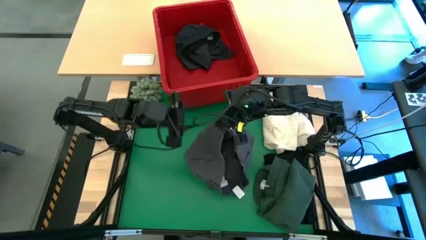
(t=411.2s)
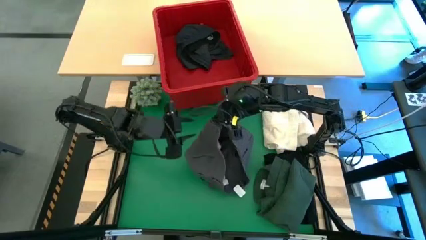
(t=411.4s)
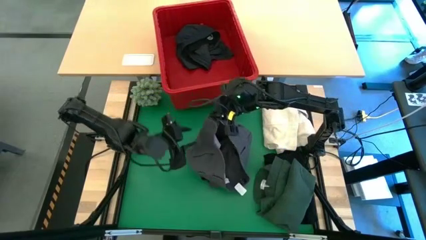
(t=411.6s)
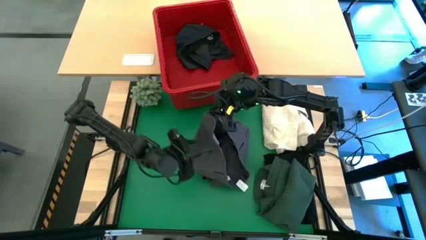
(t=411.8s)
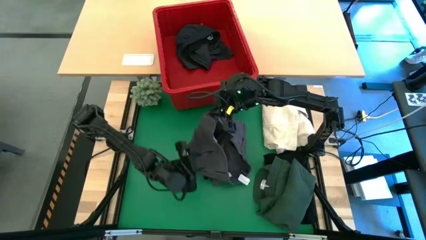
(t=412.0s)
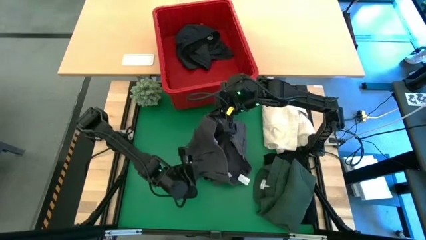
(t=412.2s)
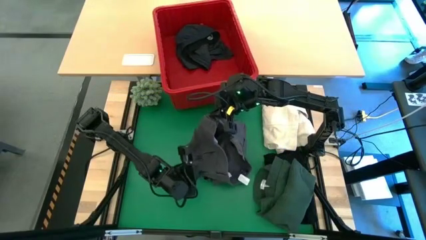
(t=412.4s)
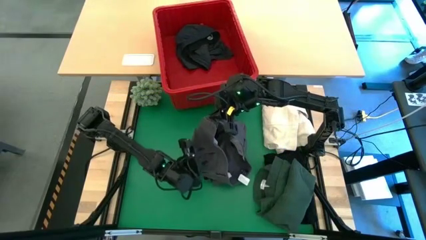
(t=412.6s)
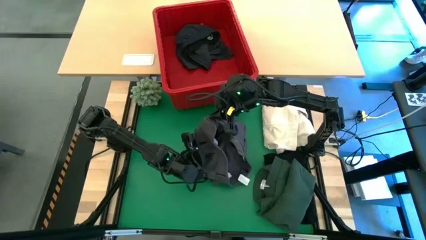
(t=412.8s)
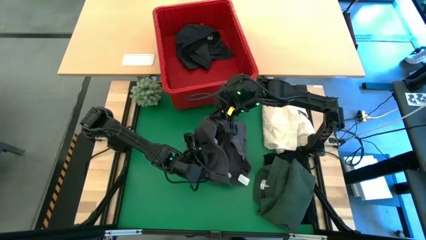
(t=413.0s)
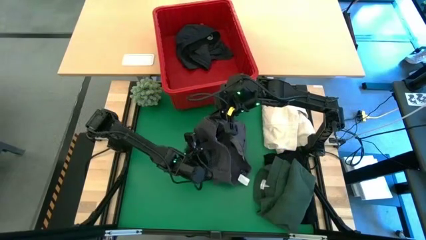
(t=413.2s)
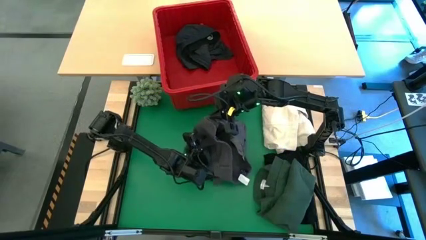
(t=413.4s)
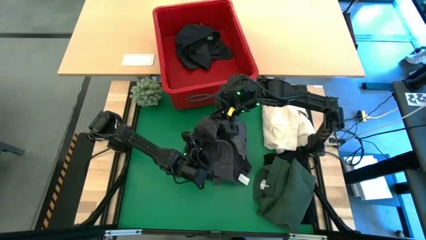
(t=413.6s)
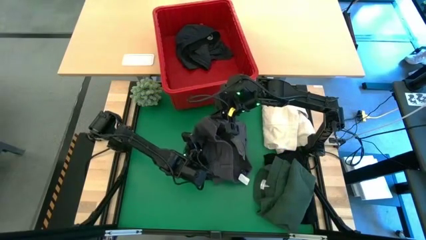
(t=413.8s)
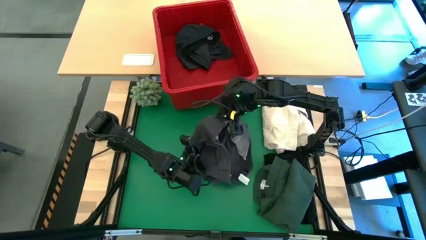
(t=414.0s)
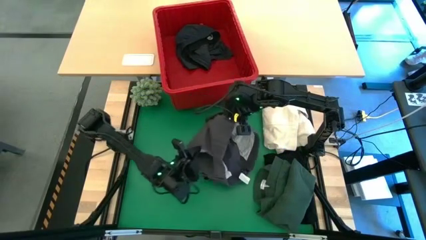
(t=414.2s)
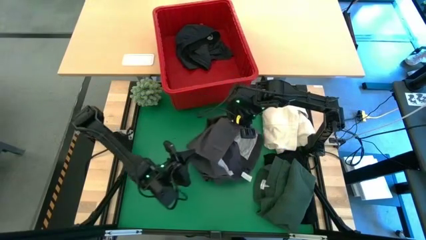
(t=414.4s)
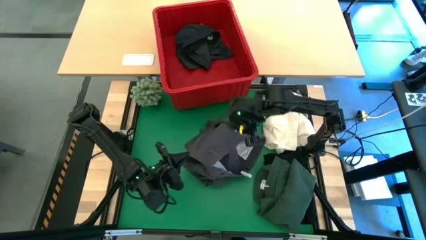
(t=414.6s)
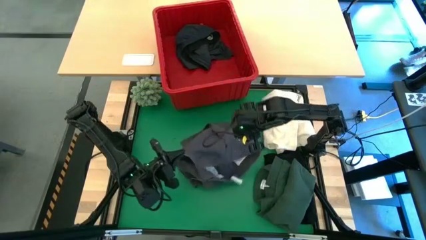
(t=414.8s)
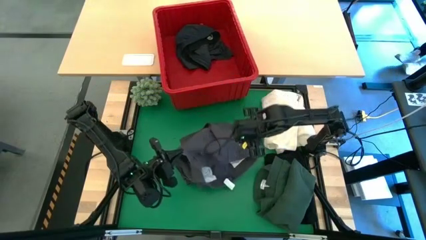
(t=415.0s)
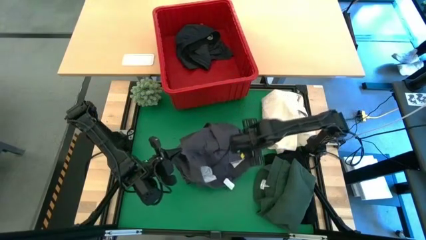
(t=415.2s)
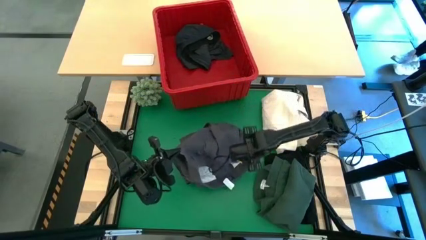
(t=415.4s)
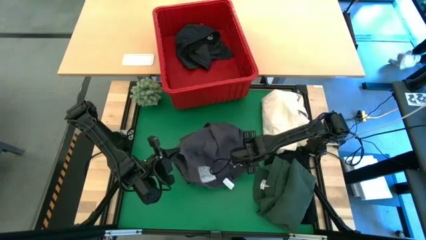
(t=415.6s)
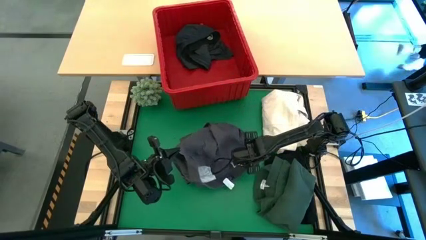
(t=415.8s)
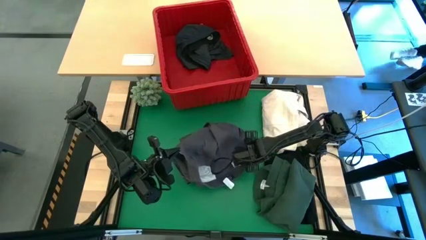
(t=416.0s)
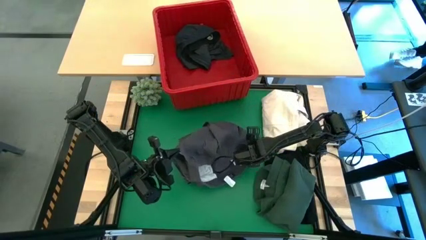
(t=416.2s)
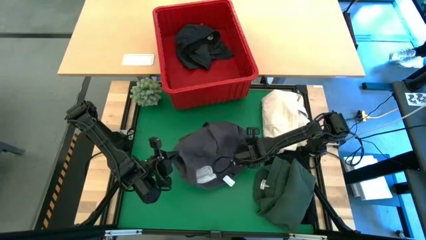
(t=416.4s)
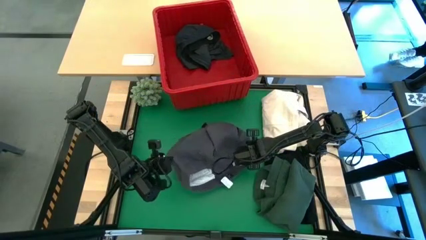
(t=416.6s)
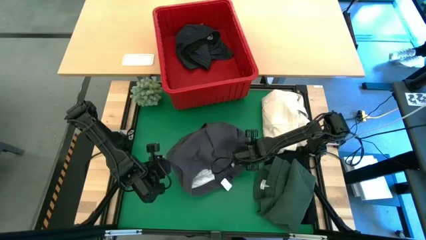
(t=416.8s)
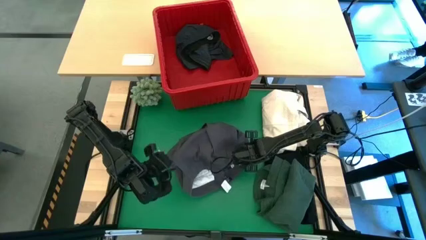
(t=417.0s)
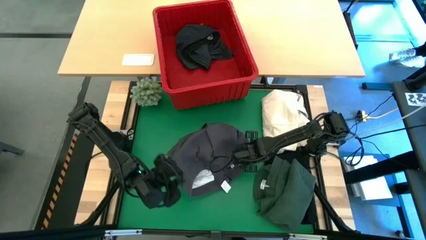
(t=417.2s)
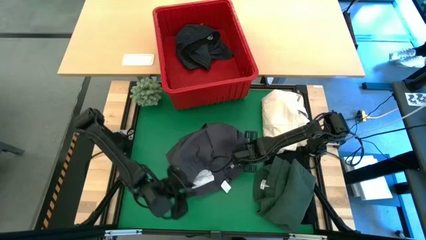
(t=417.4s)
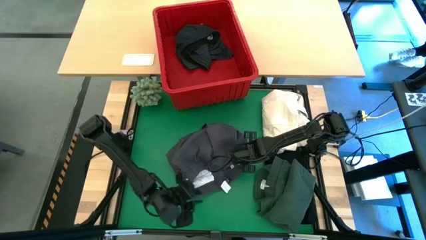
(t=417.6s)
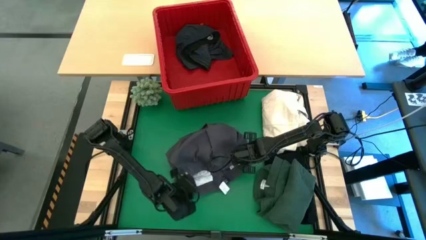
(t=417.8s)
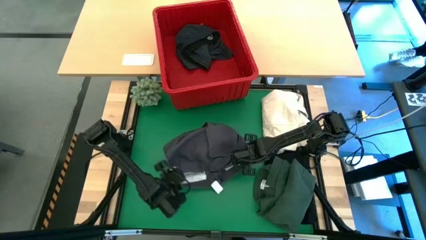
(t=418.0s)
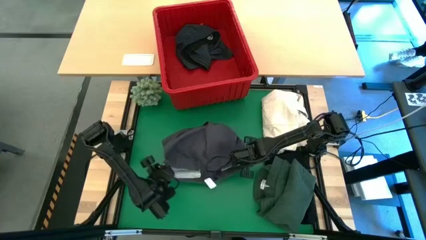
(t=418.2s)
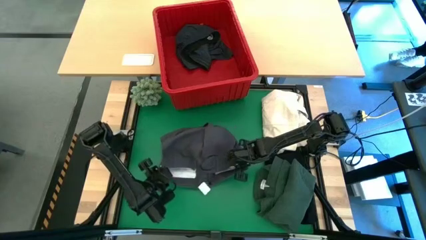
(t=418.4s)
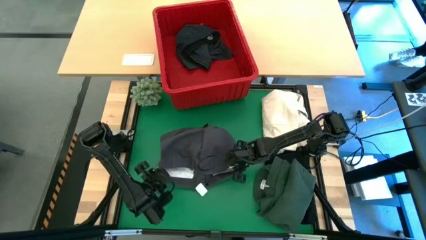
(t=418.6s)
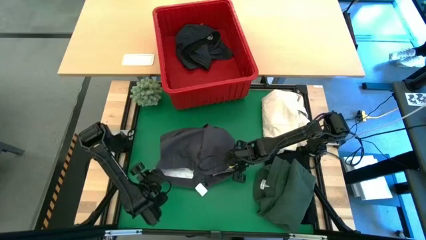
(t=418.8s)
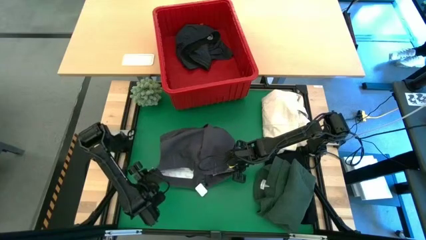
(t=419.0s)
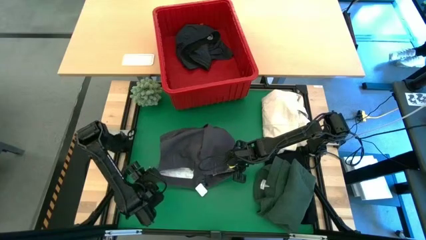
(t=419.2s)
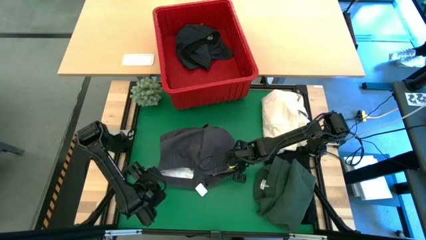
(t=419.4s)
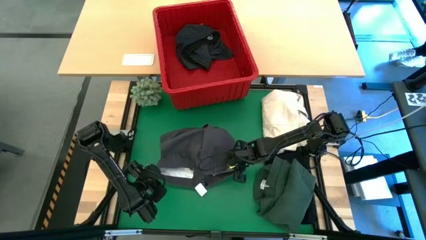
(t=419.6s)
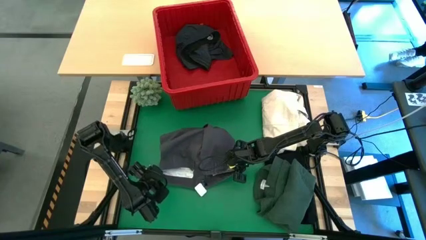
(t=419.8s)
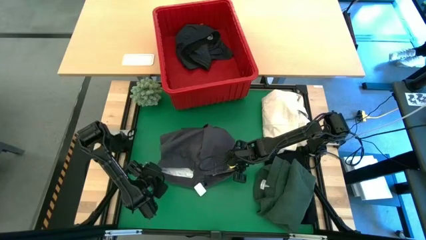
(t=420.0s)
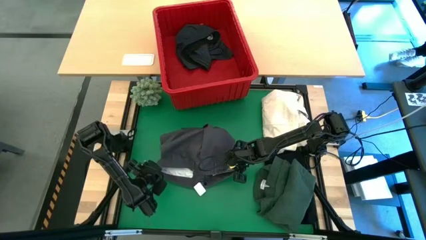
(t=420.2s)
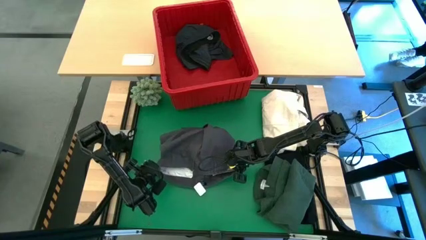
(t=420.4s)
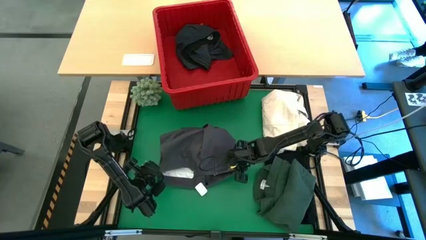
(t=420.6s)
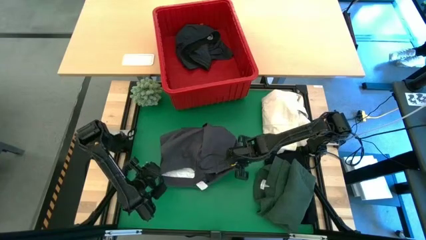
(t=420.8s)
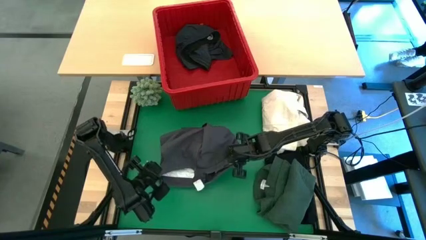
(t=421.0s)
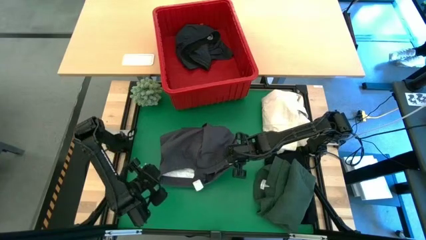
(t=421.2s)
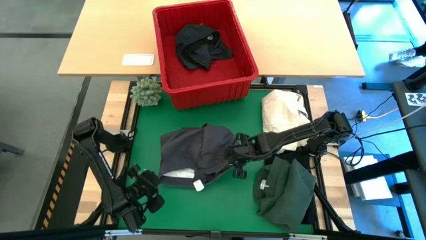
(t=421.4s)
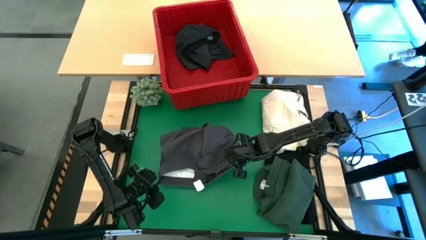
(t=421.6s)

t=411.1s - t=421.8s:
Task: Fold laundry
Fold the gray pants

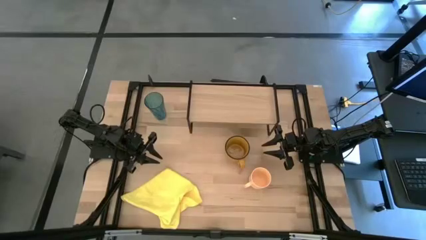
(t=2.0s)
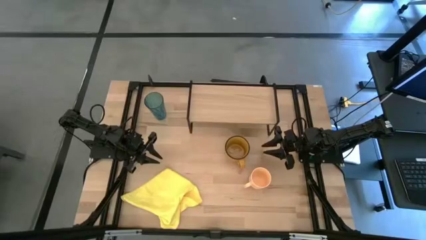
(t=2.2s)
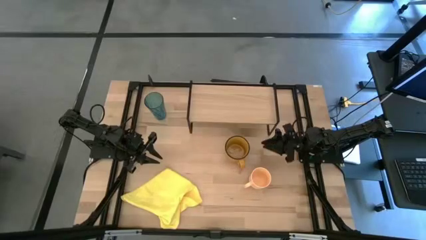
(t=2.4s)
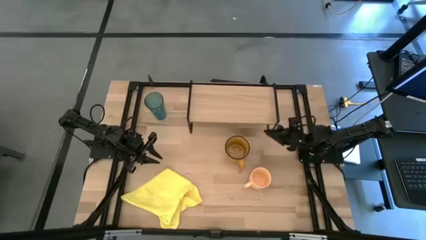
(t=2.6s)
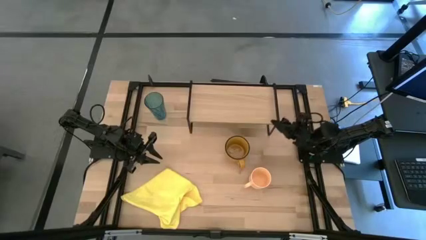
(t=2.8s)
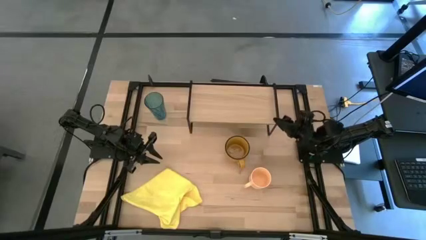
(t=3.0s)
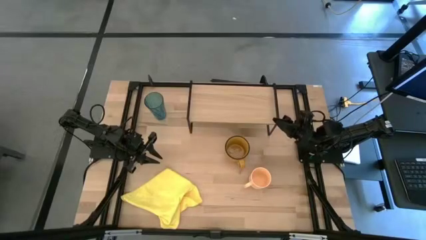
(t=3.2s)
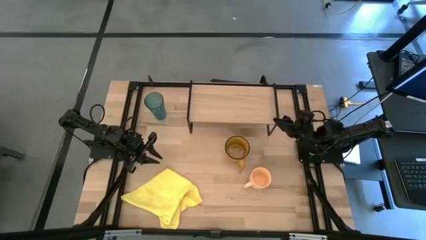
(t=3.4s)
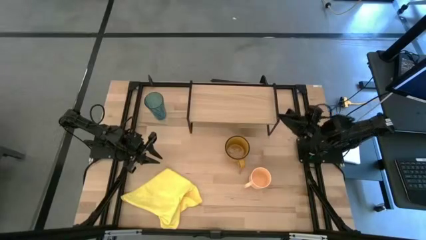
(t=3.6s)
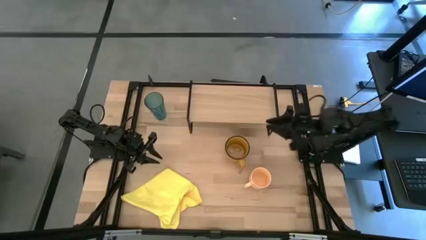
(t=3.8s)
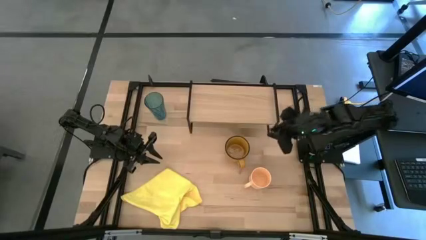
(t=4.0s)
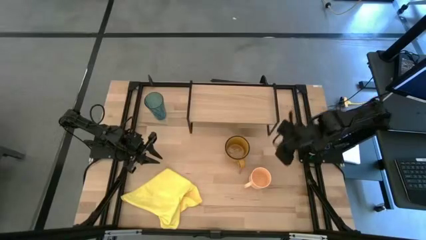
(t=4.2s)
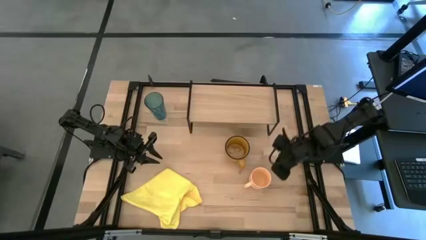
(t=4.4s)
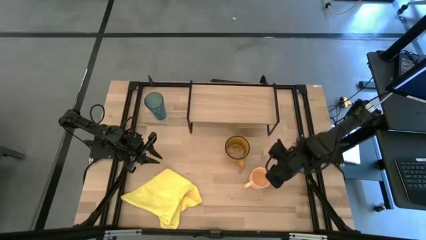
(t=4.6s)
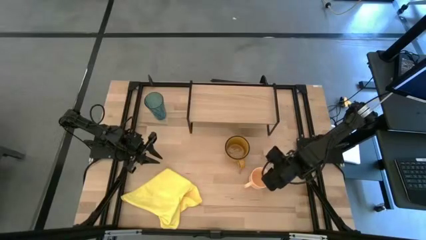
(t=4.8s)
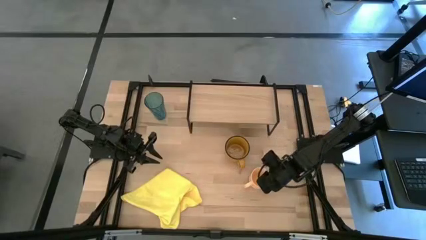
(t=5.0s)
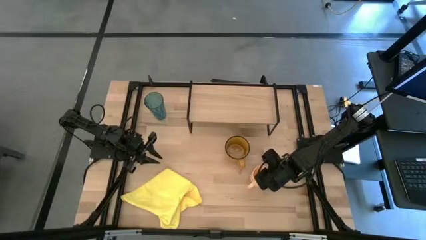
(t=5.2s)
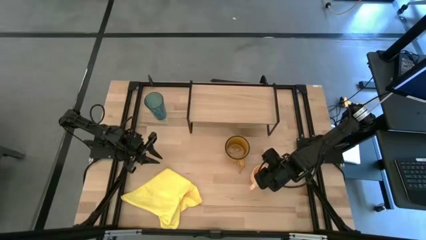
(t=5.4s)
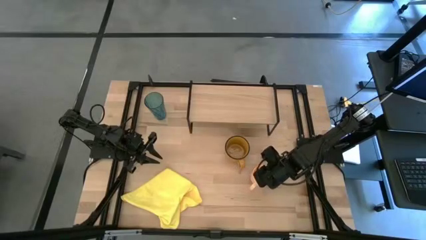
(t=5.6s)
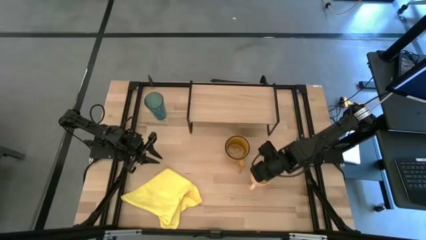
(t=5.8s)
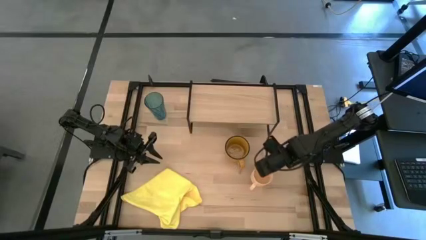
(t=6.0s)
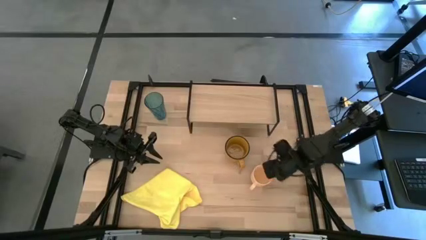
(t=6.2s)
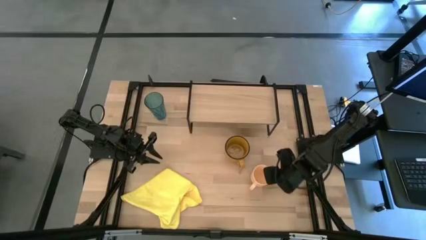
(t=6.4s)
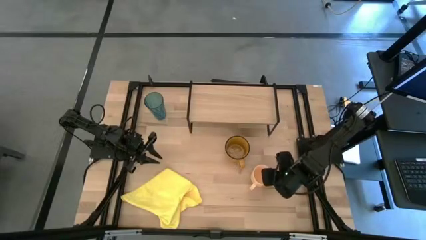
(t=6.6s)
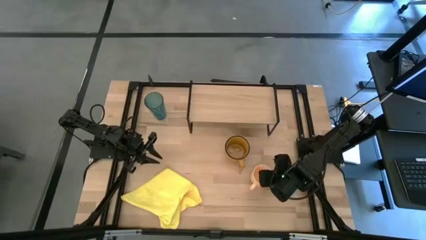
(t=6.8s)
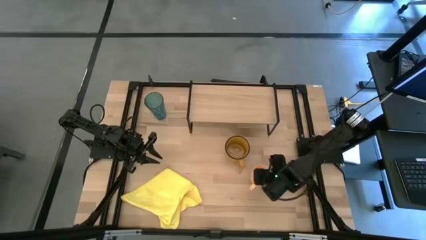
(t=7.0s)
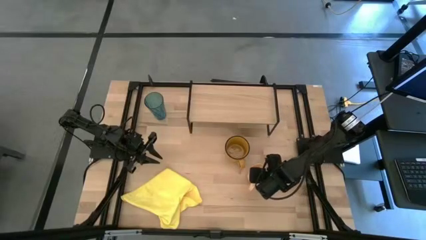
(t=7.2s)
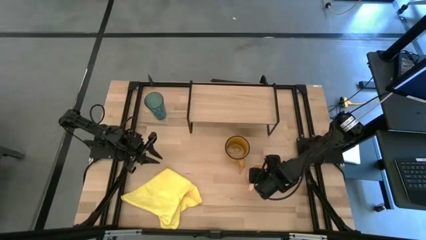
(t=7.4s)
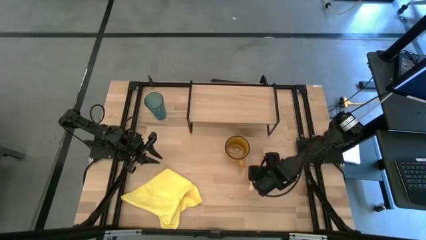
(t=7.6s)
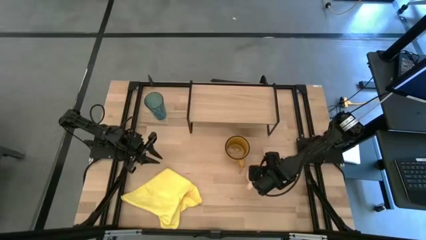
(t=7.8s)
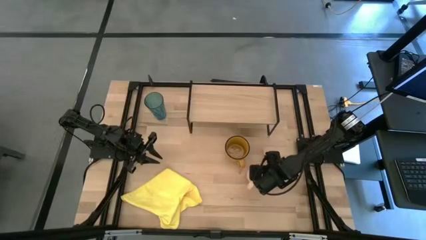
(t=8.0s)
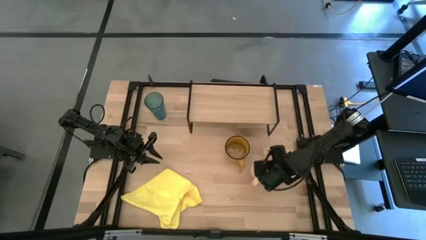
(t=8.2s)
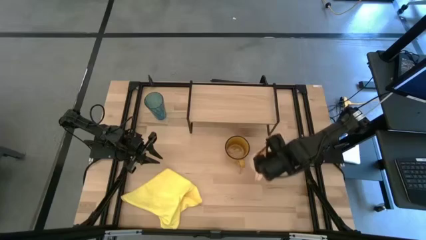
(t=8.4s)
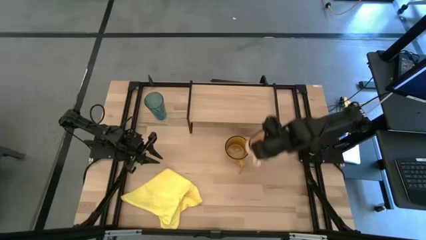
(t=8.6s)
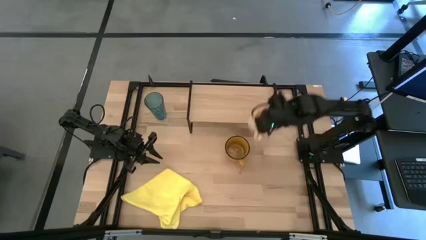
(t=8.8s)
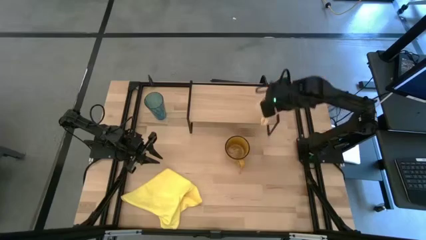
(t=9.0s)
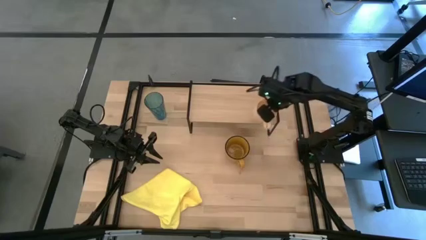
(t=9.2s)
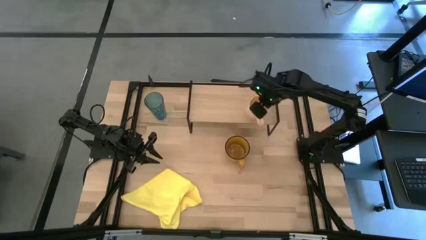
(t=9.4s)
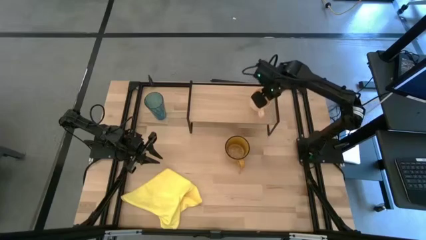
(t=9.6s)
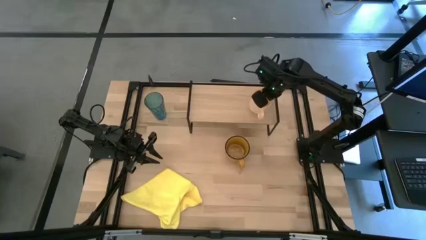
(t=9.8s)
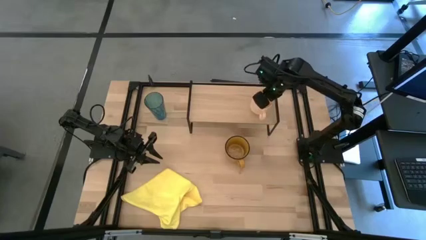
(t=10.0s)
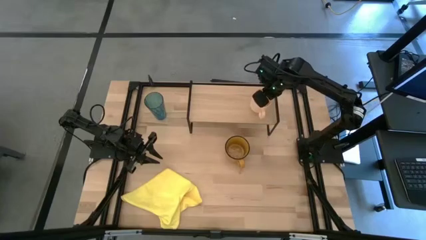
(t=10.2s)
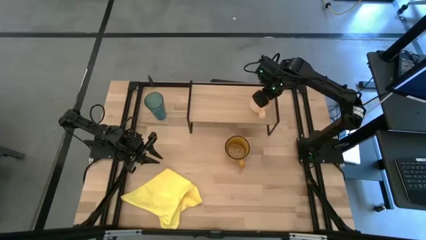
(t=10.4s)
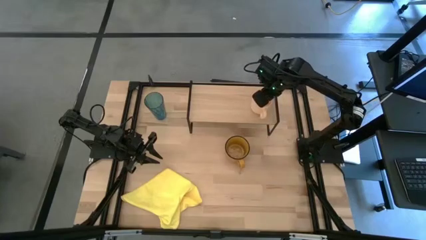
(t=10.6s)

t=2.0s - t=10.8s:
Task: Stack small to large cups/mugs on shelf
Put the light orange mug on the shelf
